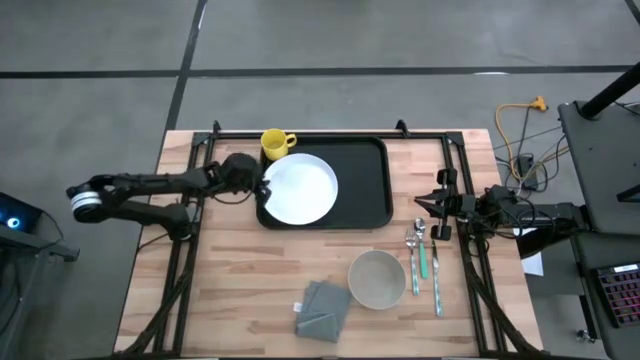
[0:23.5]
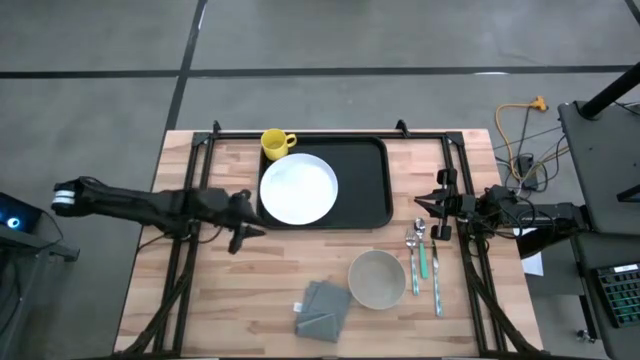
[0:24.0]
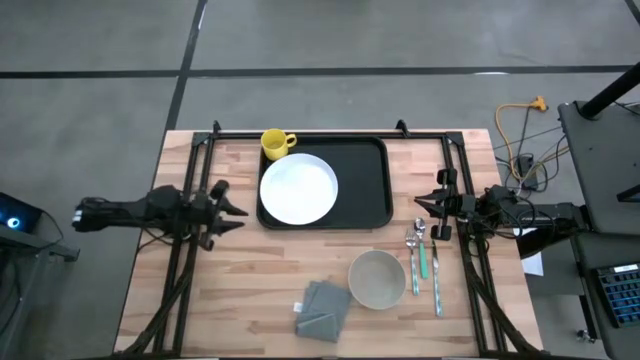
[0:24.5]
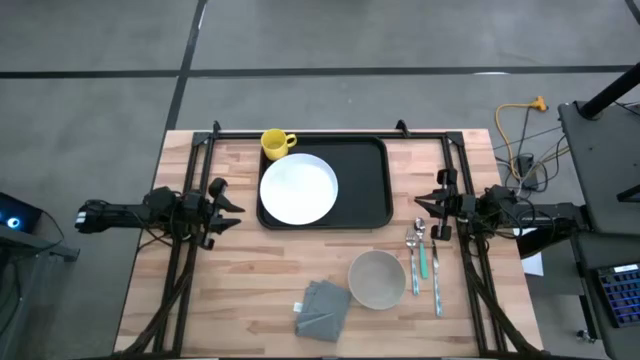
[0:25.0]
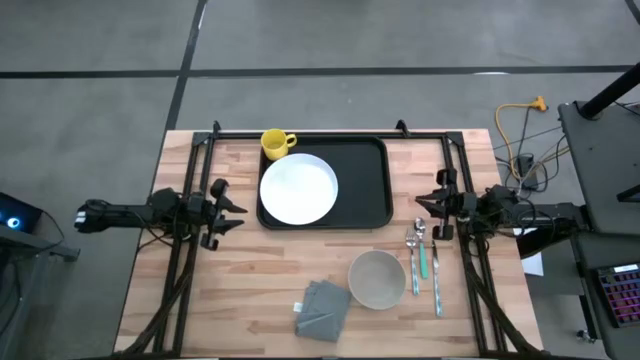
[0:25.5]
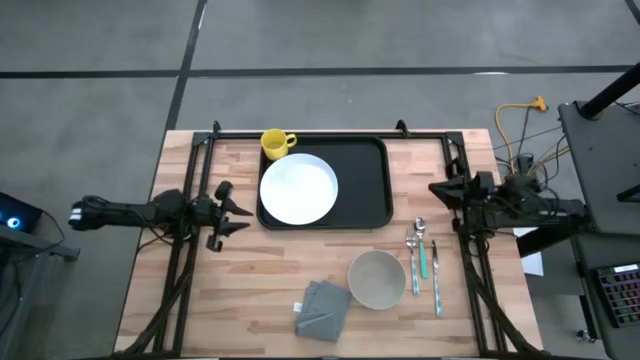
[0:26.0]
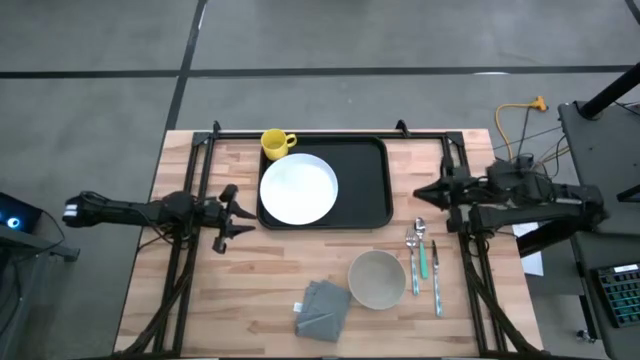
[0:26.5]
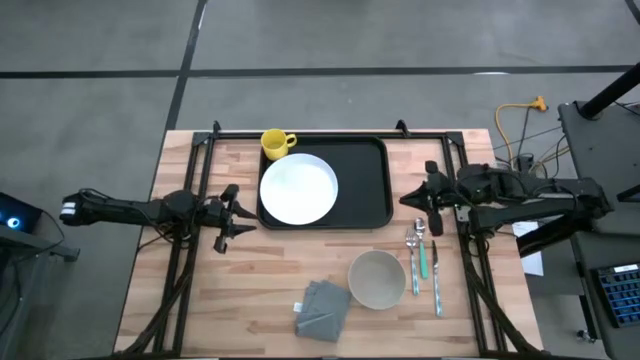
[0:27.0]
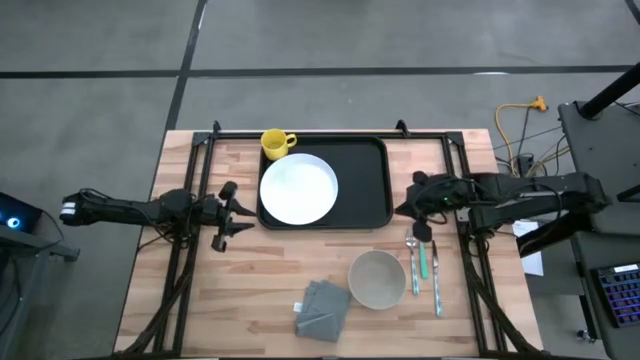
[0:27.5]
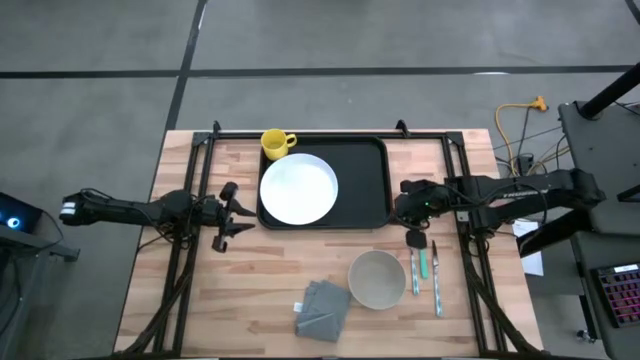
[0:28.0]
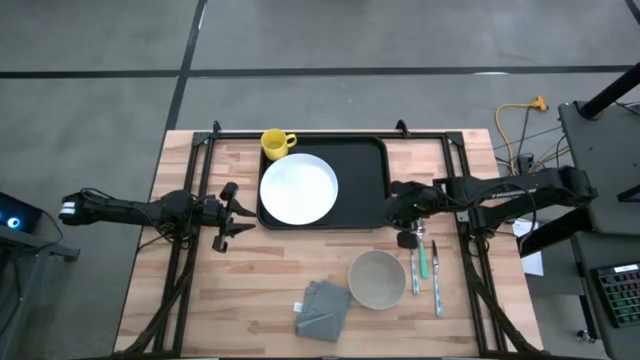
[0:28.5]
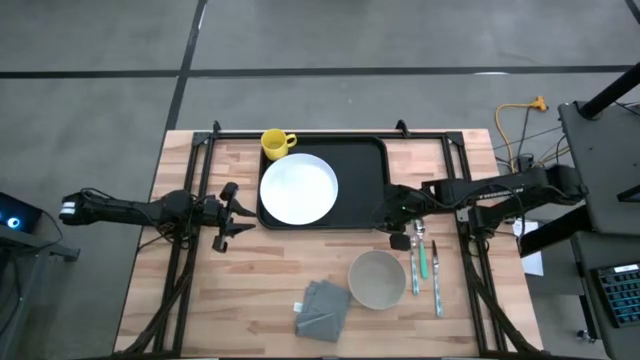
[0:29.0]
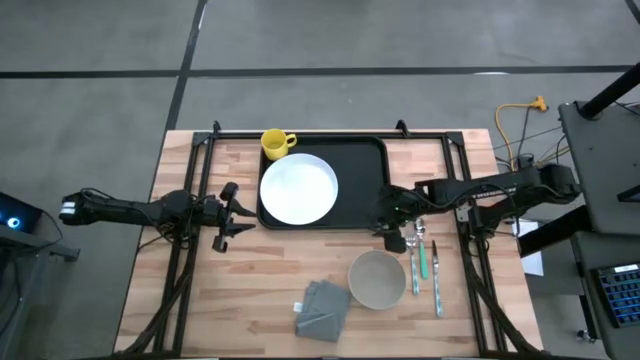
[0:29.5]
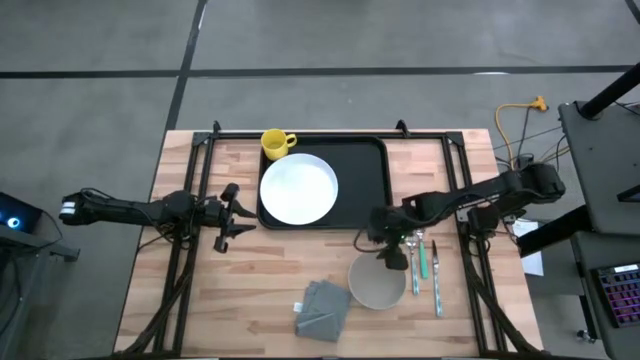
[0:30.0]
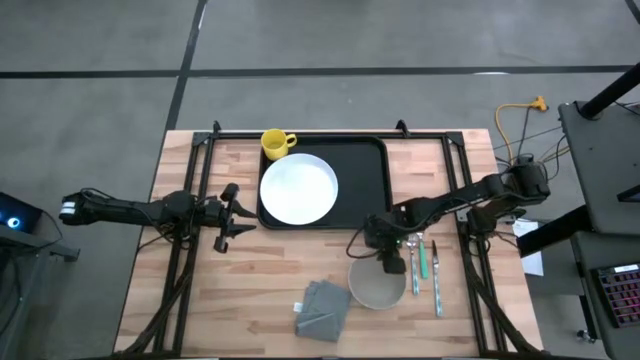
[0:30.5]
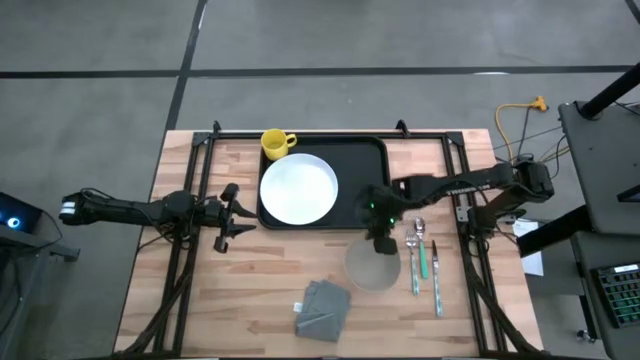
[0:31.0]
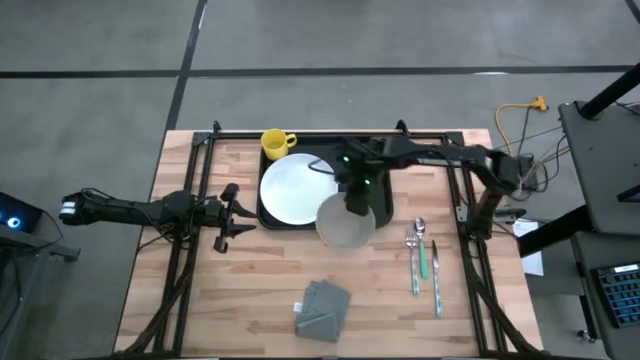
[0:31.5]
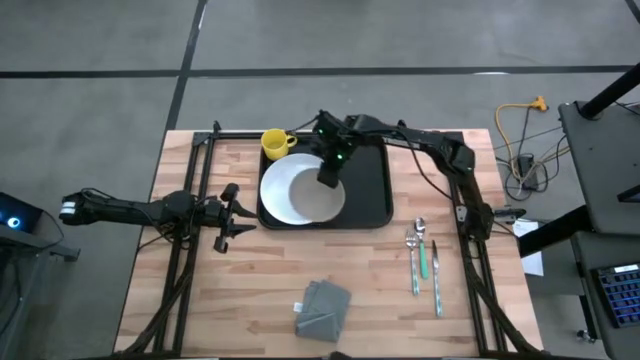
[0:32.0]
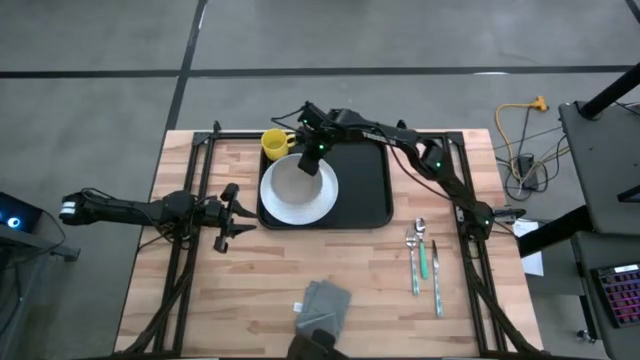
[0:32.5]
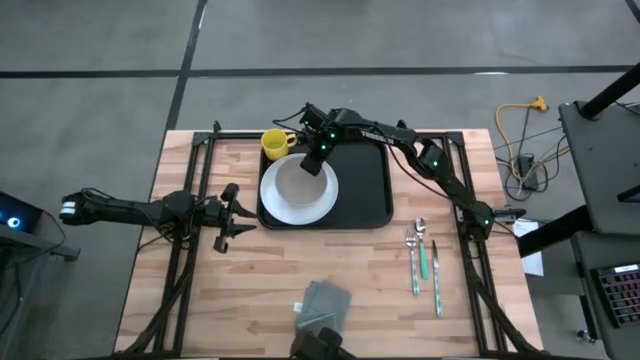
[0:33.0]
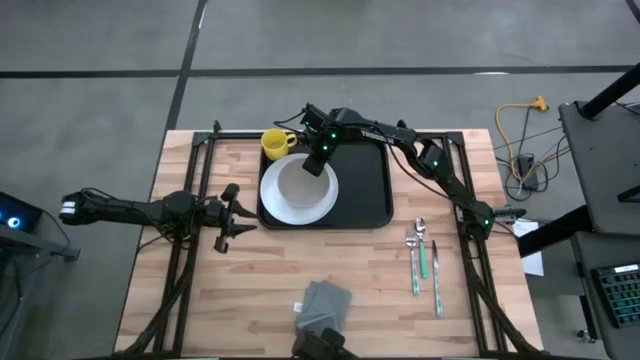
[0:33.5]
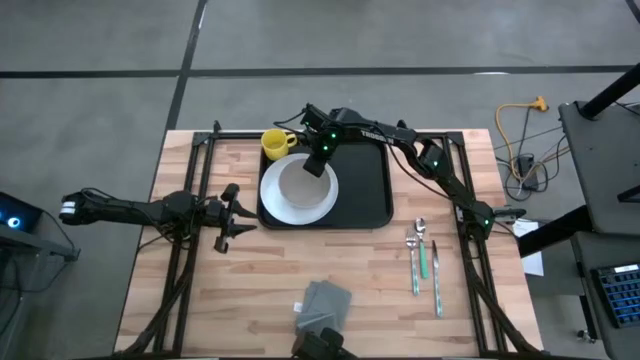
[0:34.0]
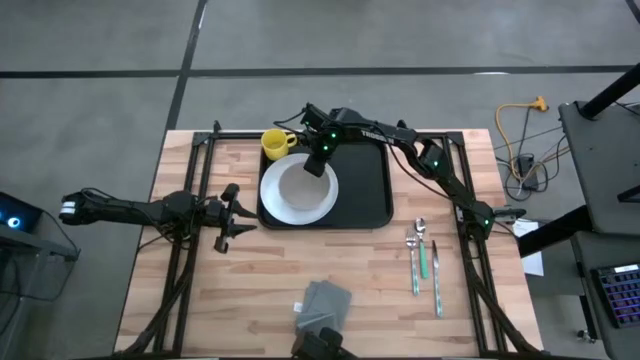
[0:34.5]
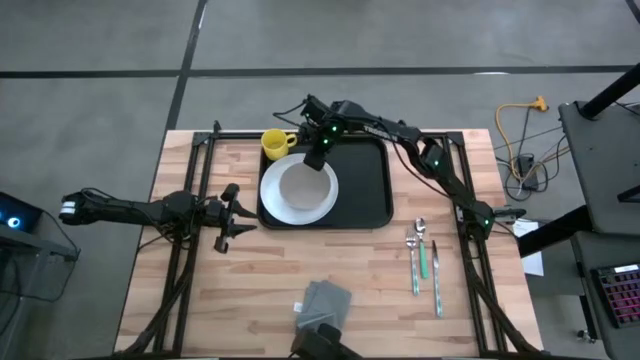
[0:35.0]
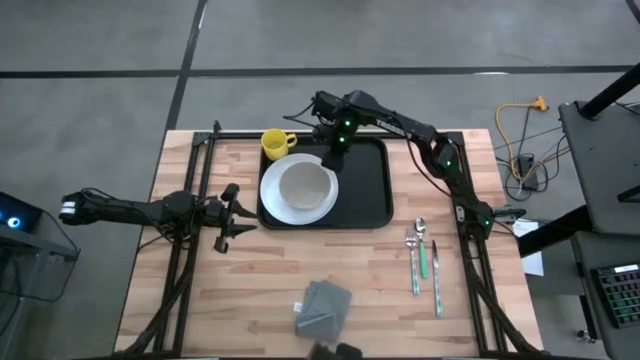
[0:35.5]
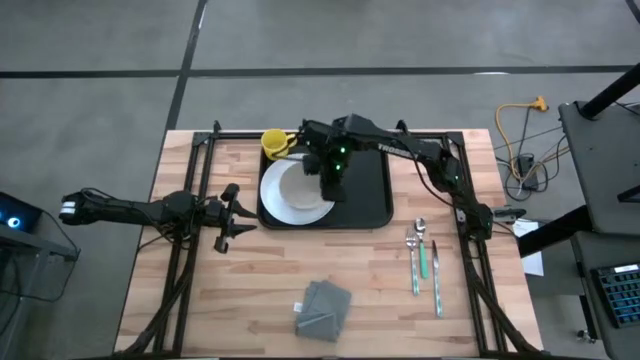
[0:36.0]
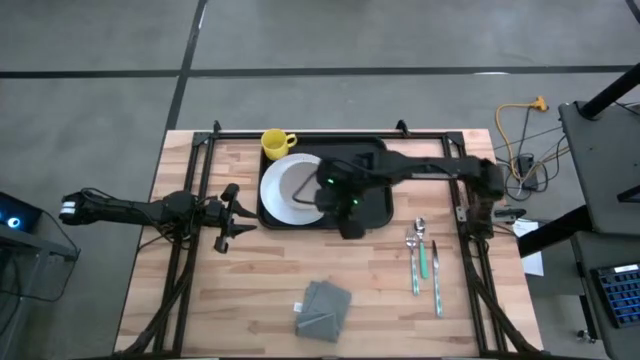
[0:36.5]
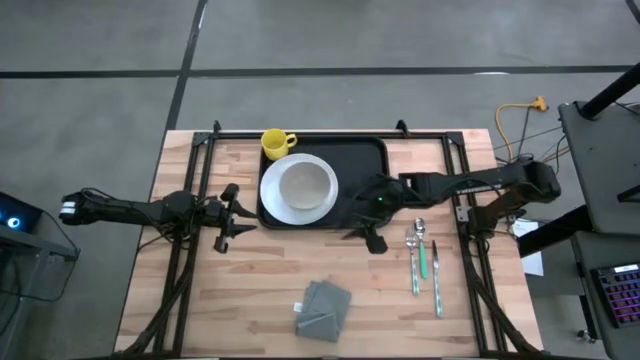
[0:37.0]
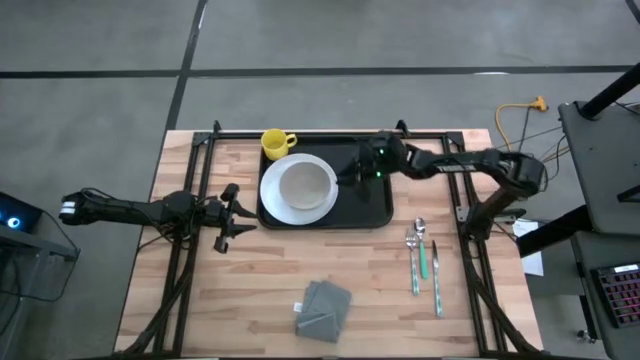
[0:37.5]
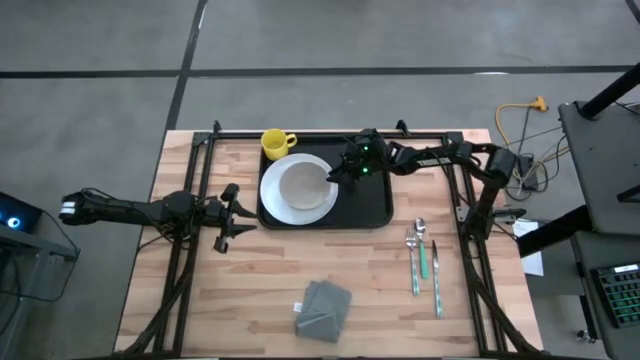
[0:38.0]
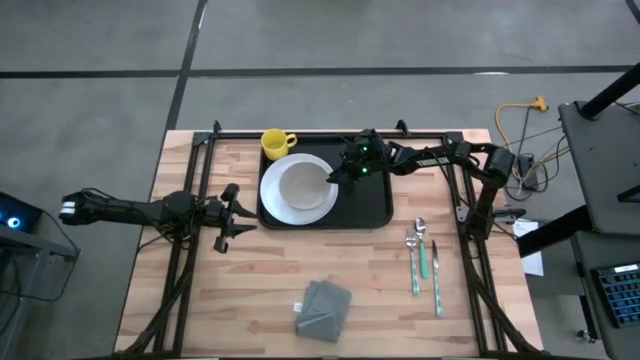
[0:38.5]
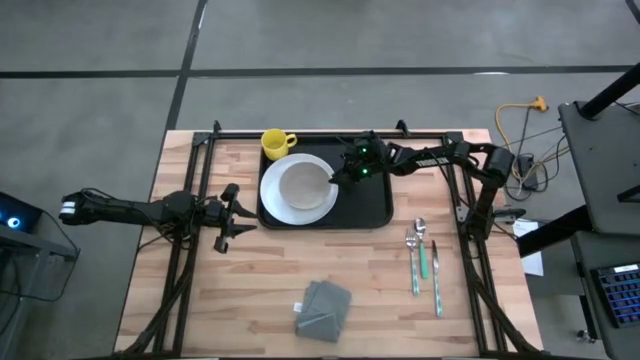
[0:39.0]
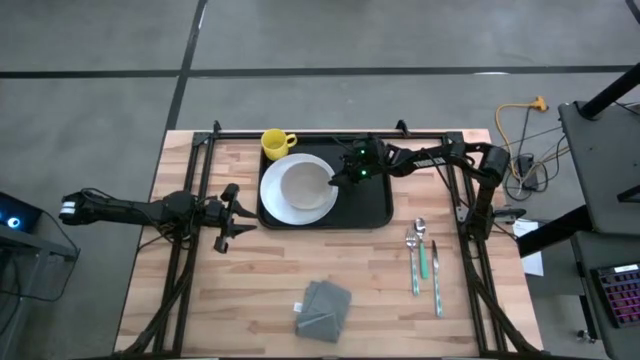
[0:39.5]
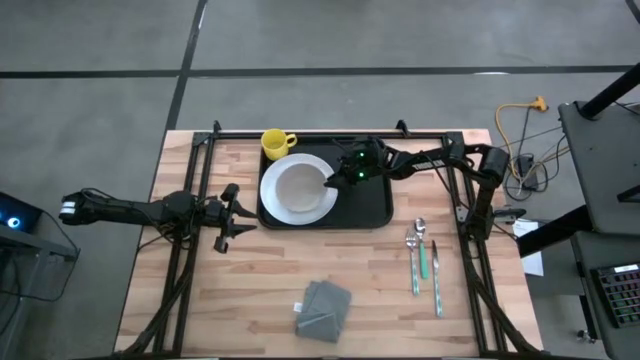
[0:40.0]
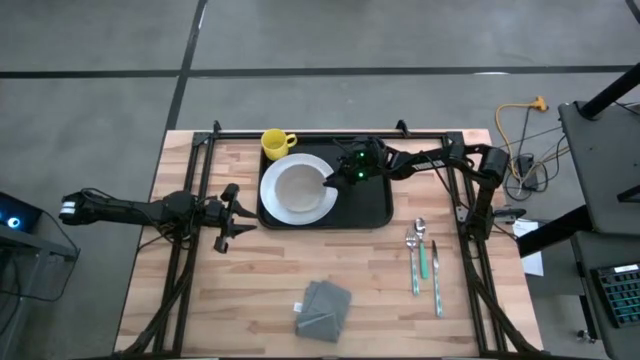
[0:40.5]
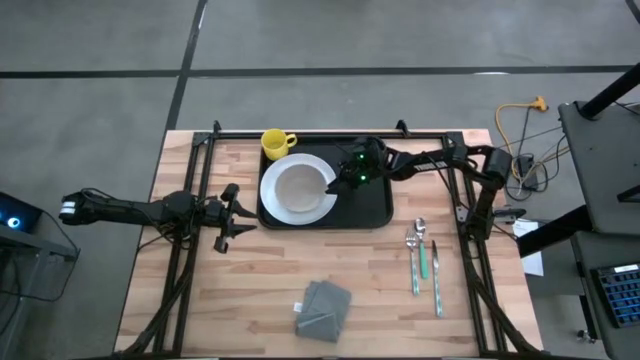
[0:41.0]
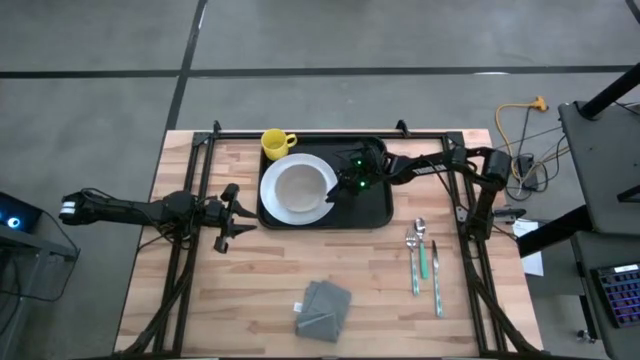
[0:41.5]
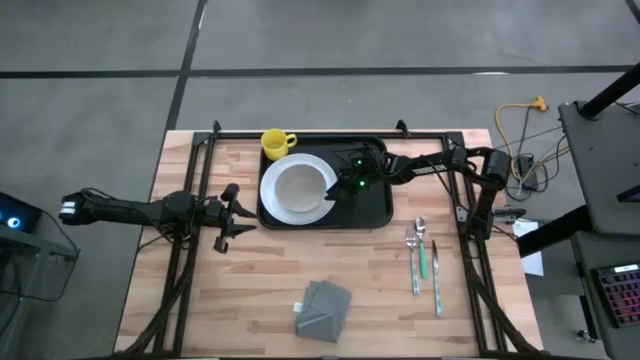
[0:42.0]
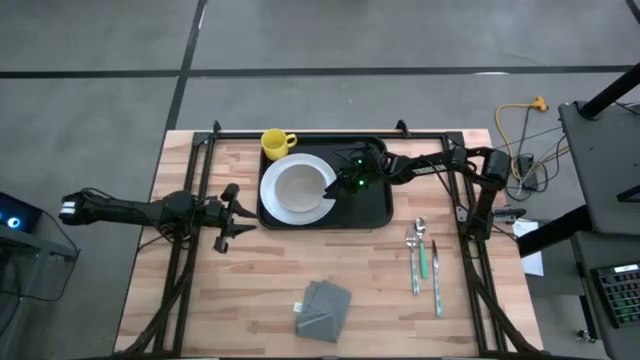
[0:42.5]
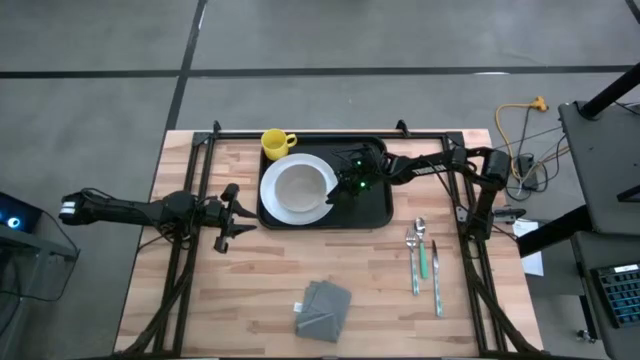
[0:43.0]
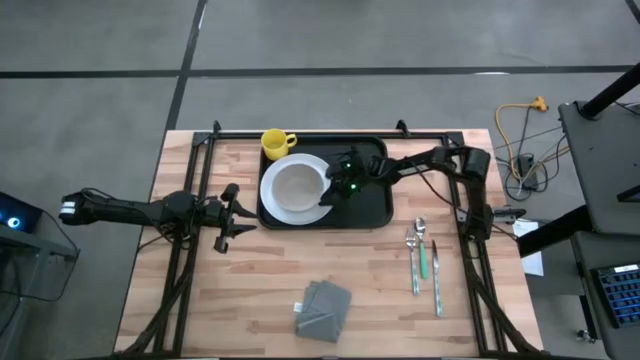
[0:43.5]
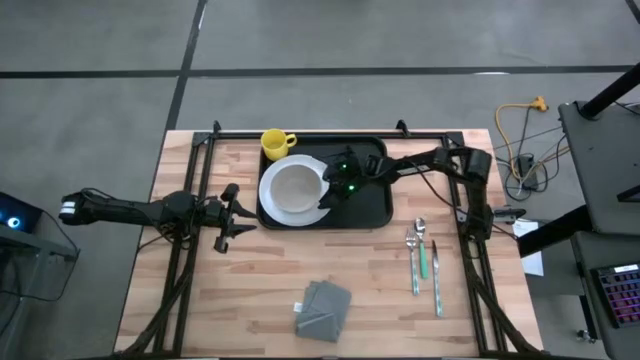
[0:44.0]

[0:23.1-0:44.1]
Task: Set up tray
Put the gray bowl on the white plate
